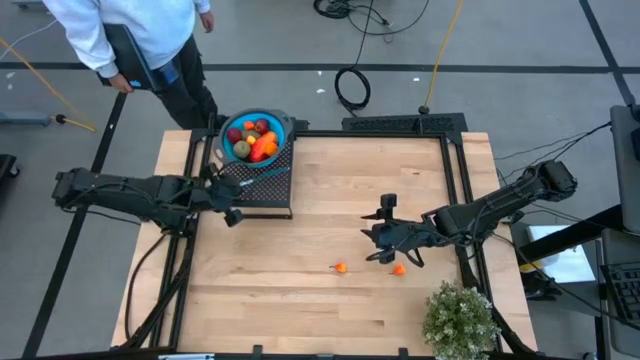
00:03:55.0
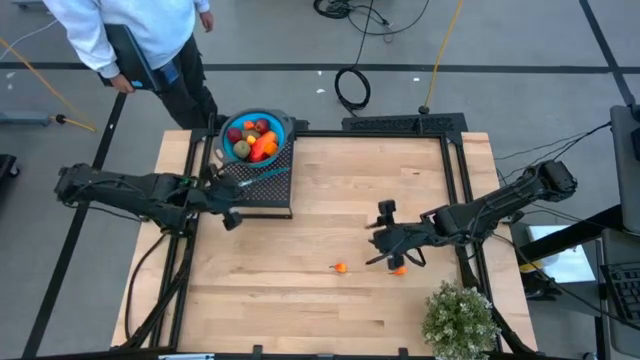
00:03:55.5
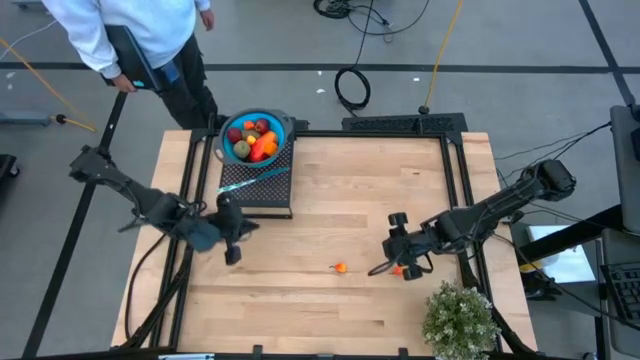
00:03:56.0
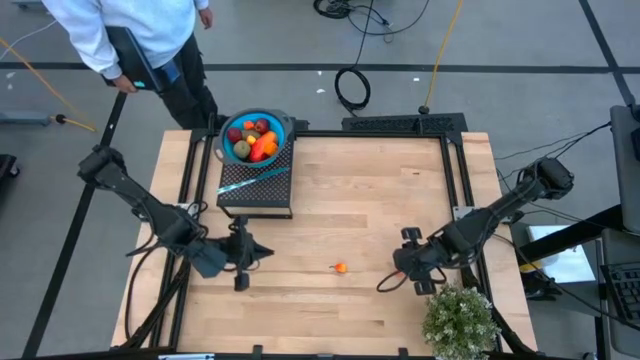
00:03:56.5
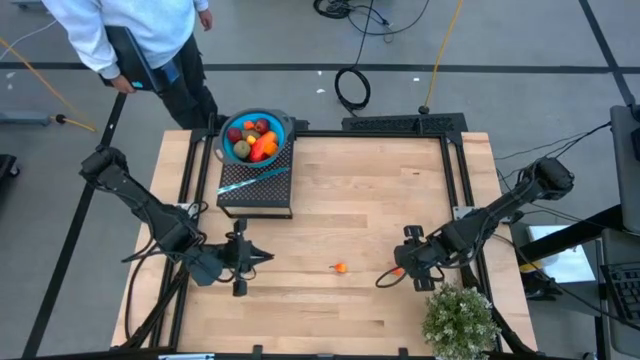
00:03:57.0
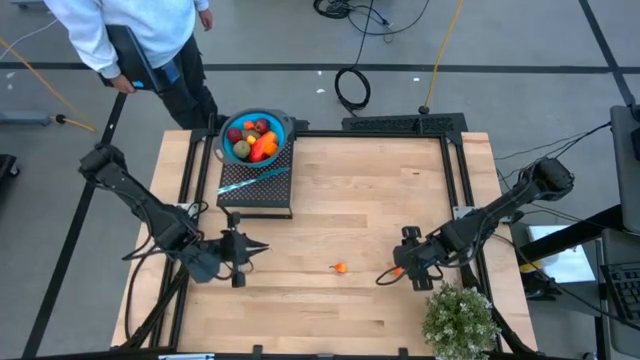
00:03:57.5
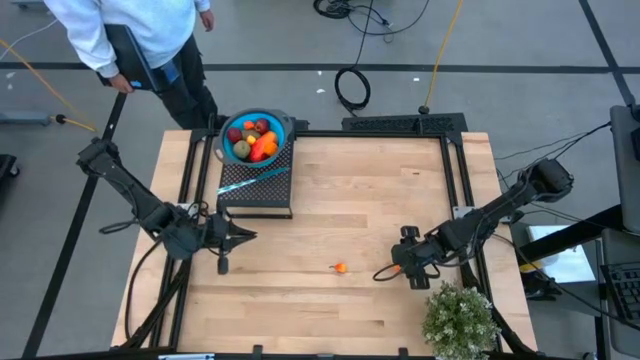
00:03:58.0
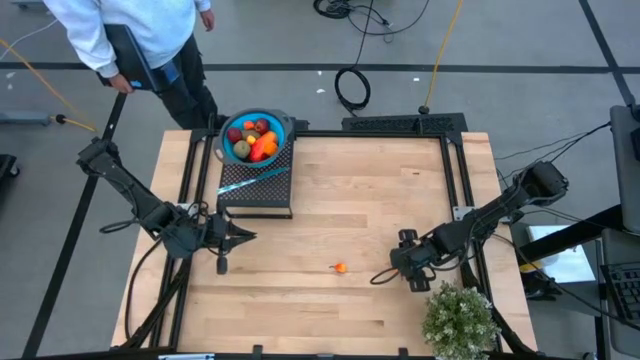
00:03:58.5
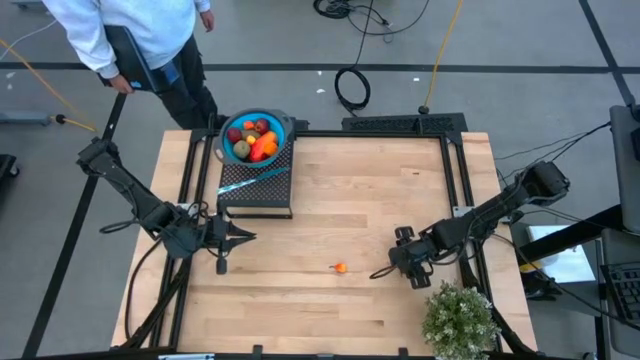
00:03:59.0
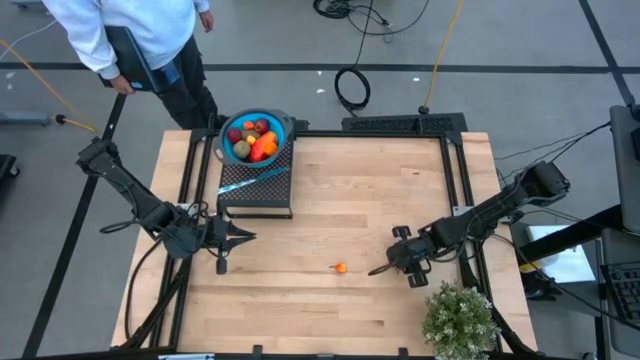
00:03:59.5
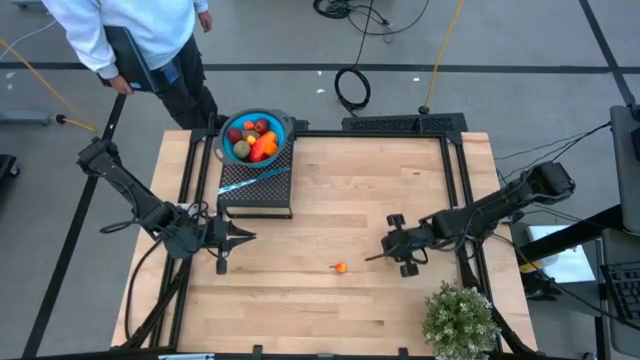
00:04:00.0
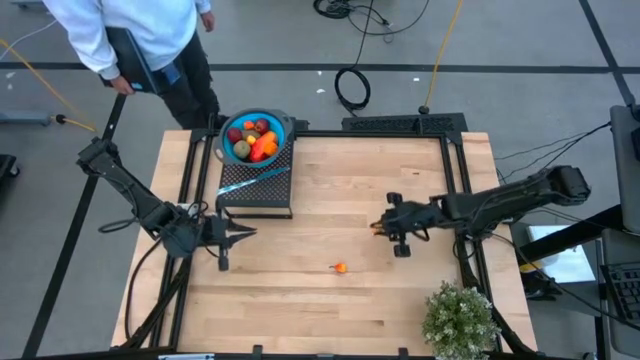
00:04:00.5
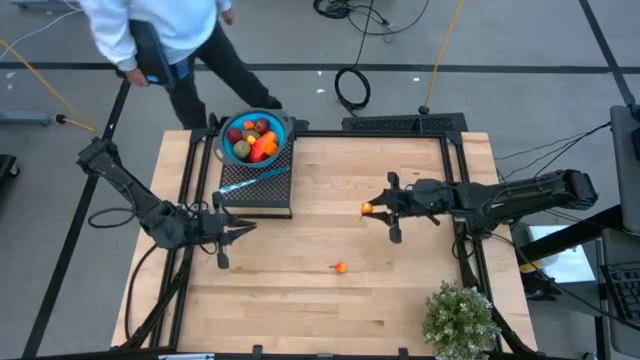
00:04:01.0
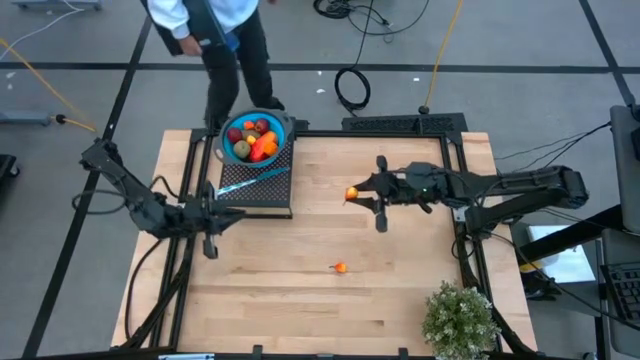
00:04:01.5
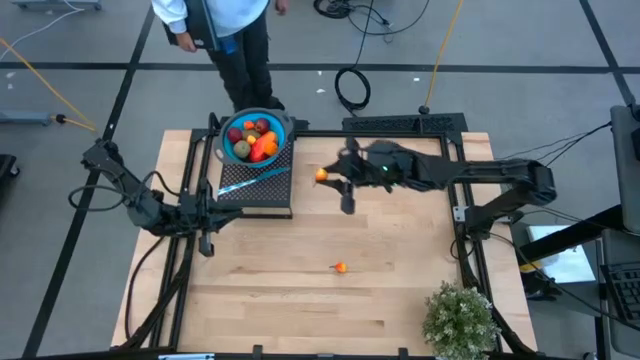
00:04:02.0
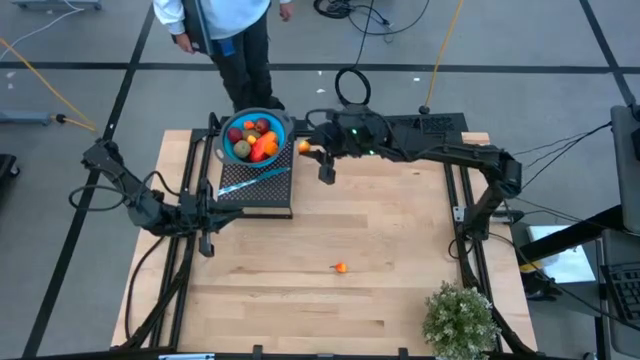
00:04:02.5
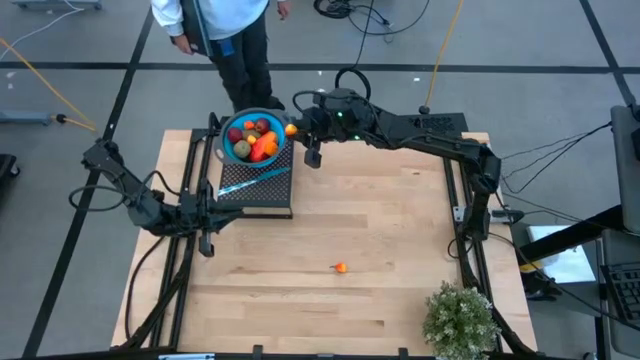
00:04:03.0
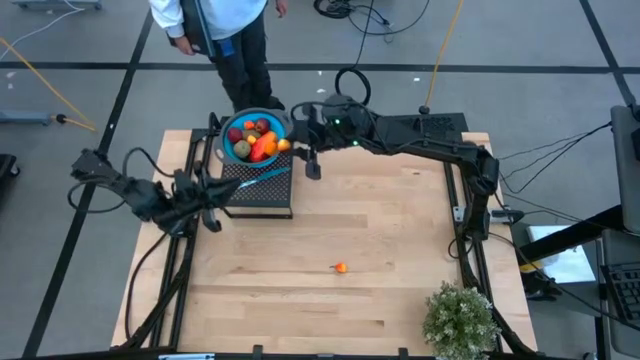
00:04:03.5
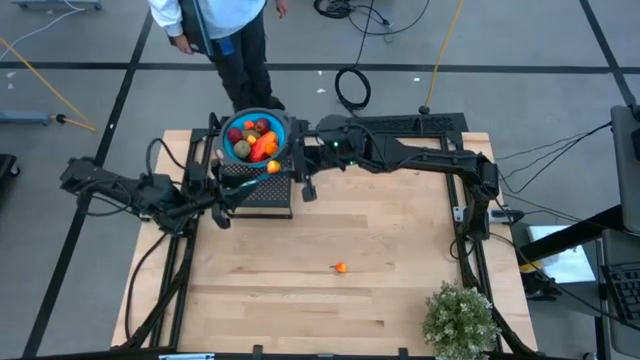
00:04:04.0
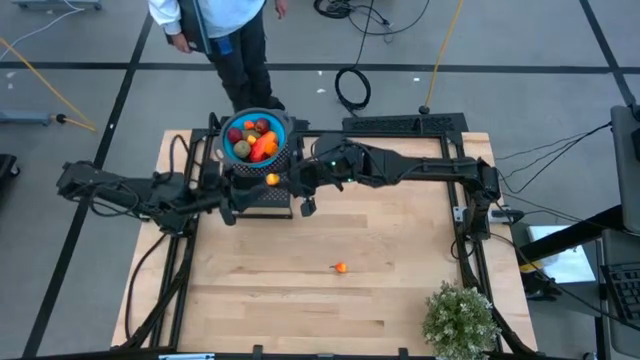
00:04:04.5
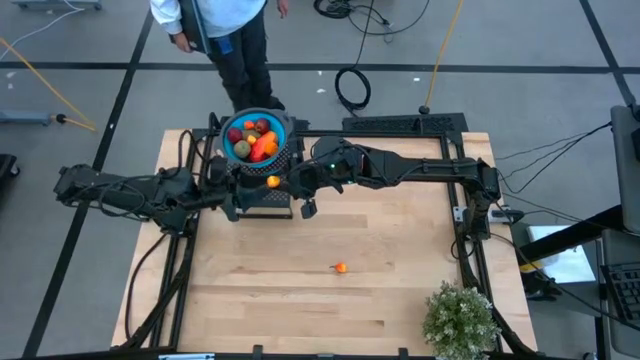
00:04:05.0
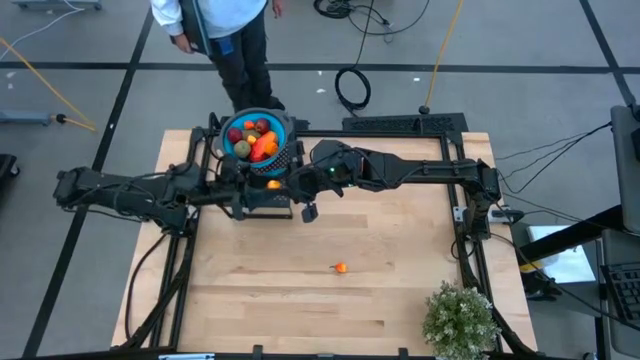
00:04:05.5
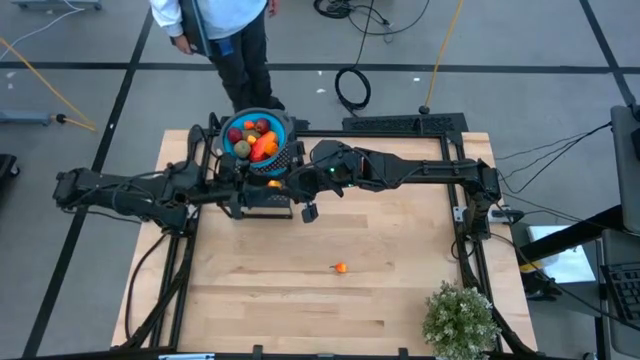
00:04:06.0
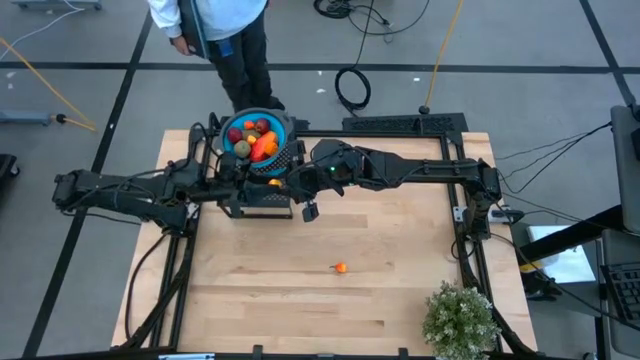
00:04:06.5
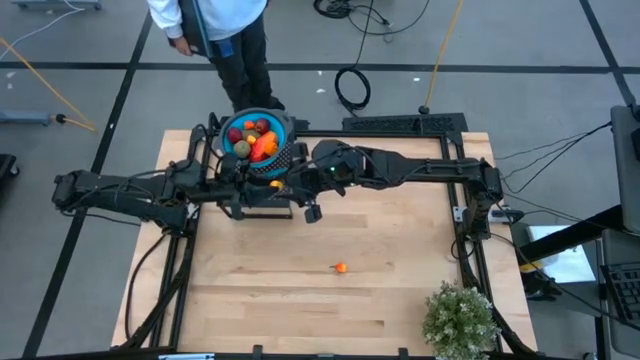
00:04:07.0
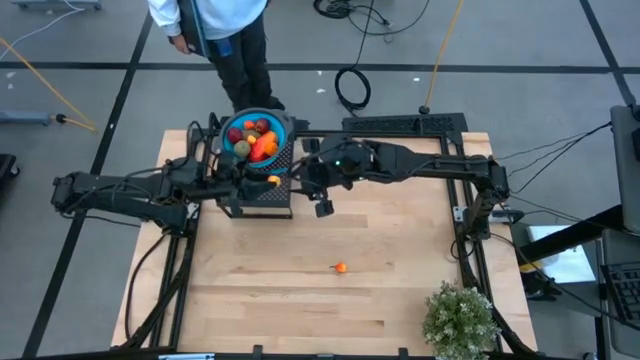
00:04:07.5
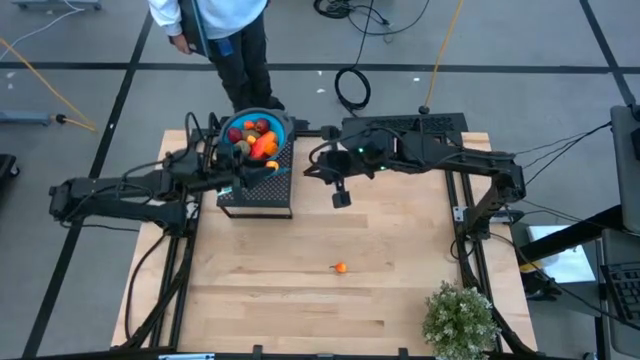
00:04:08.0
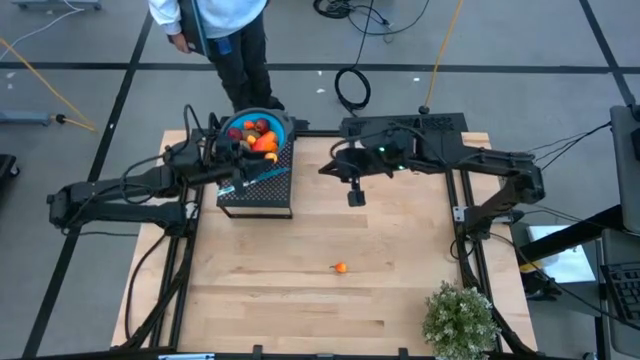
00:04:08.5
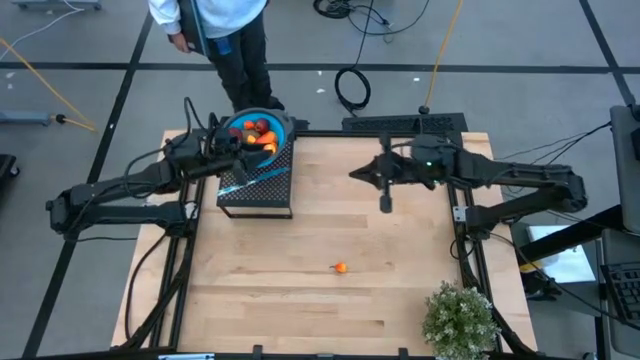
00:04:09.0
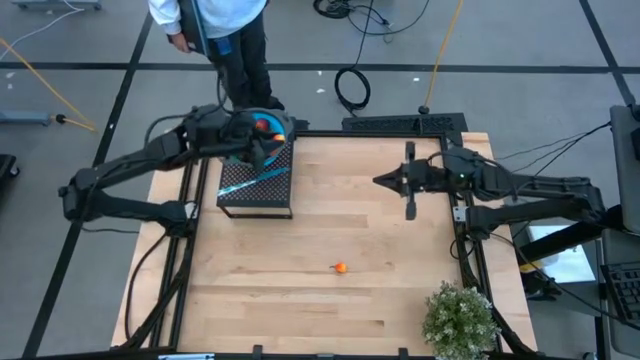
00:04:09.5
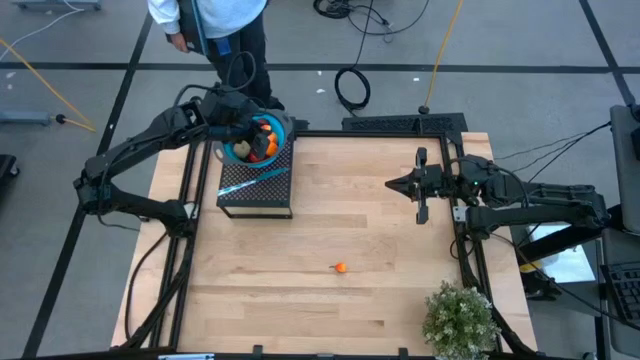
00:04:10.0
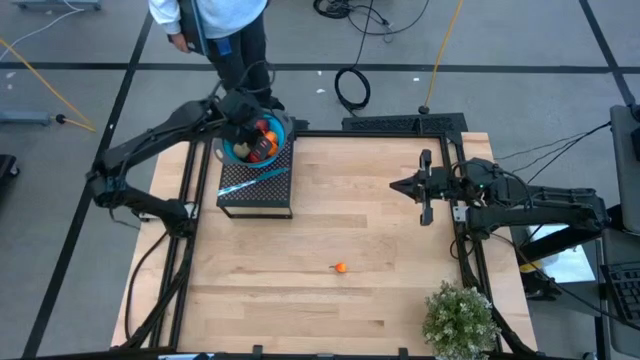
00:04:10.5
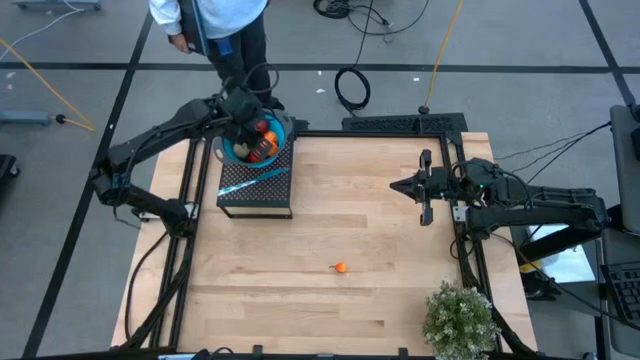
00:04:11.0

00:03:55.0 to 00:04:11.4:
Task: Pick & Place Fruit
Put the yellow pear into the blue strainer bowl on the shelf

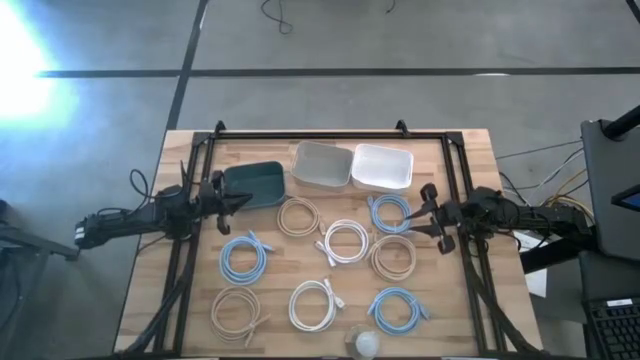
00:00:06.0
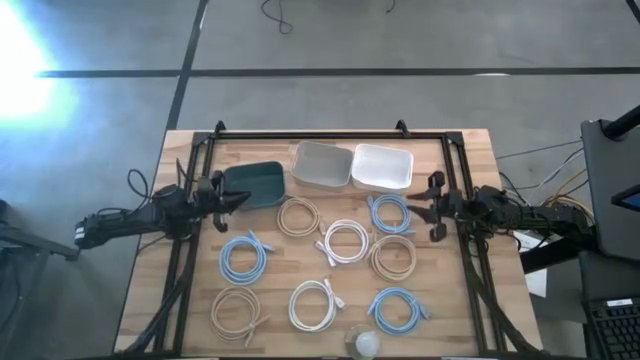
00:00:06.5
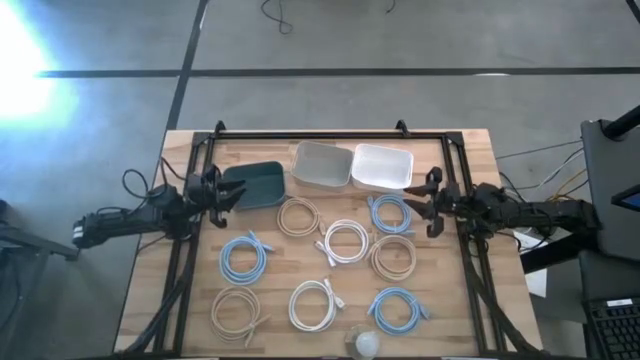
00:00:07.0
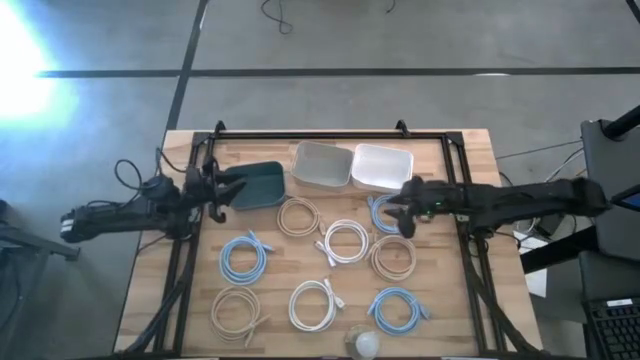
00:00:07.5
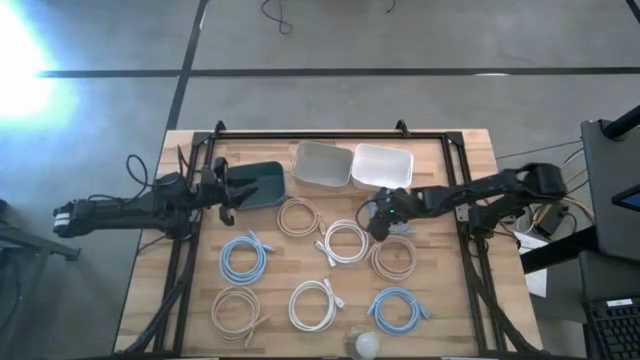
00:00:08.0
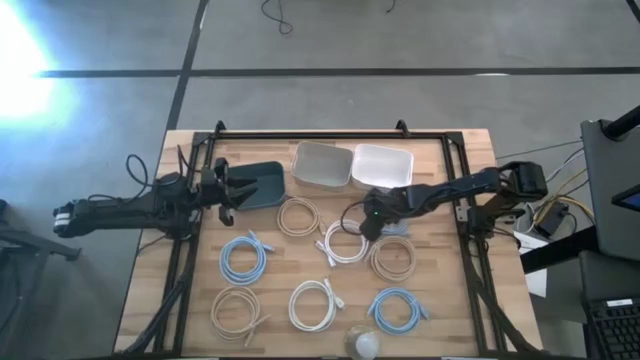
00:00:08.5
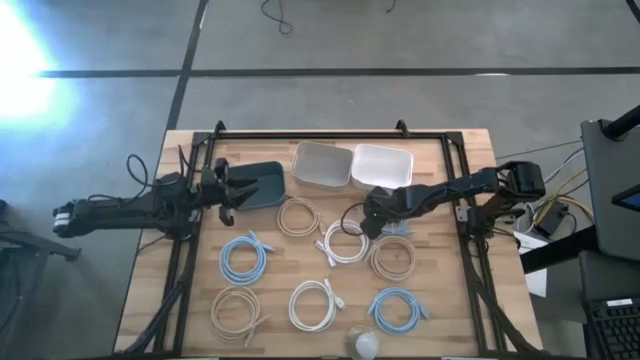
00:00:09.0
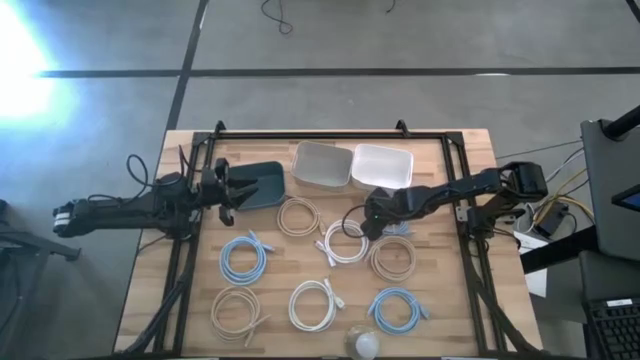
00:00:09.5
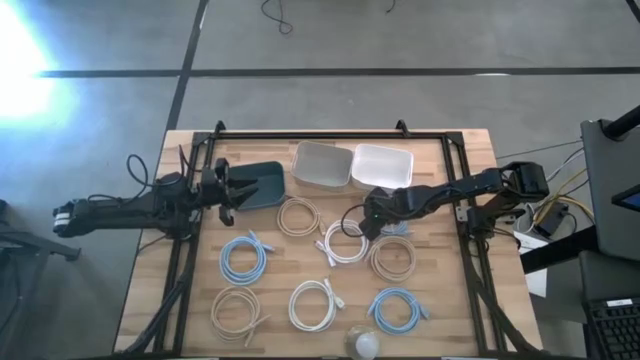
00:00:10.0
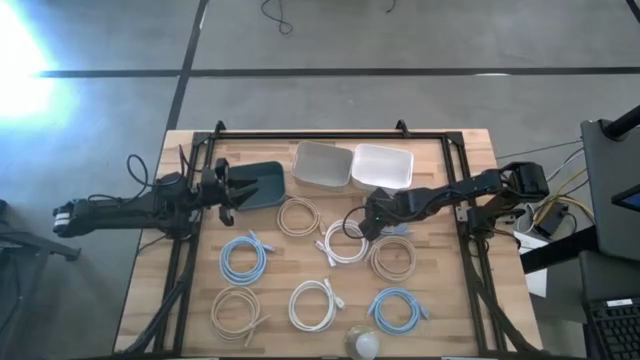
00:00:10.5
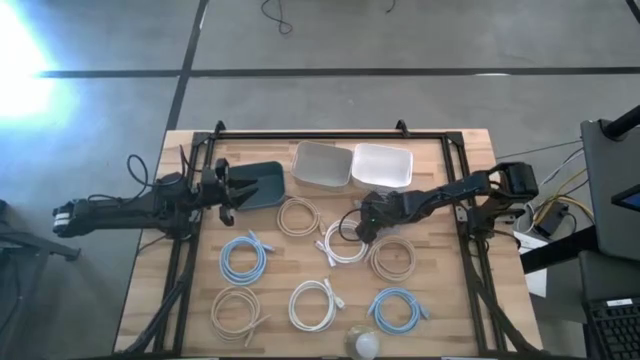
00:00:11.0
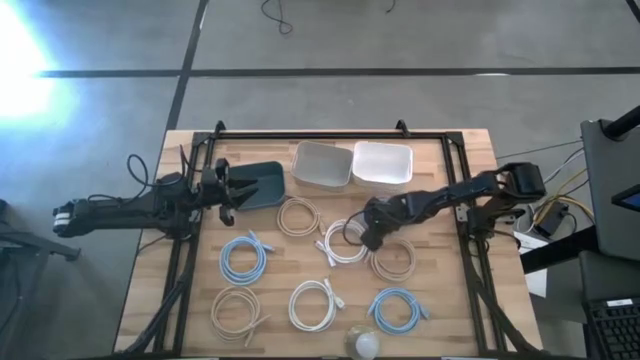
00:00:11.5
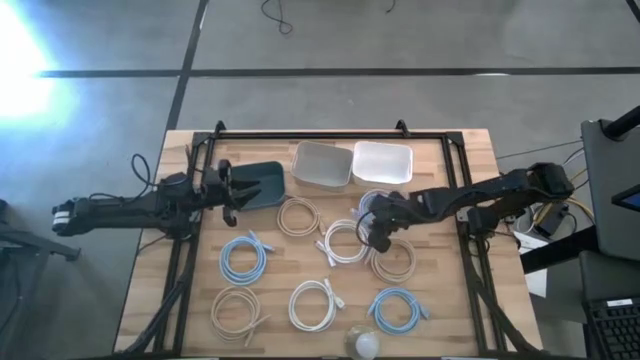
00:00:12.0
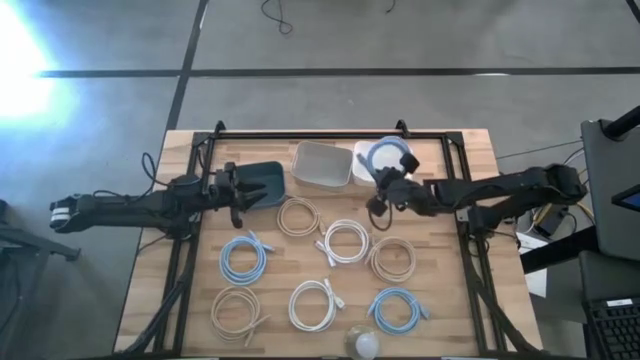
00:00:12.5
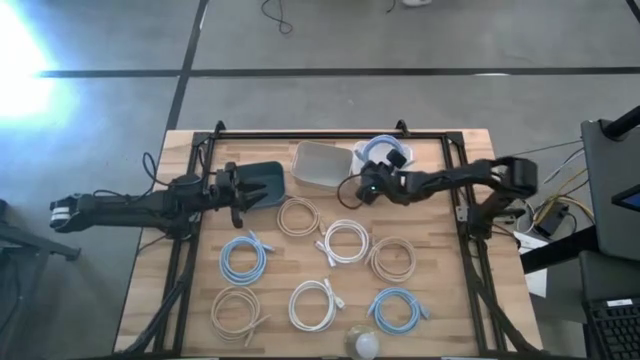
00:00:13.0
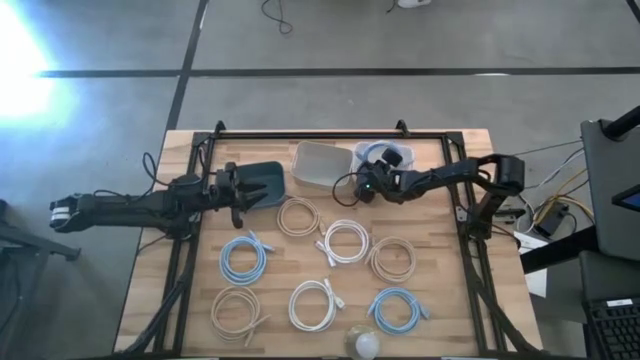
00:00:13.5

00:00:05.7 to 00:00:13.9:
Task: Pick & Place USB Port
Put the top blue USB cable into the white bin
